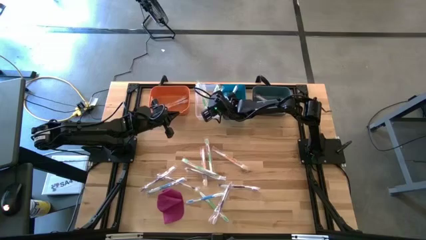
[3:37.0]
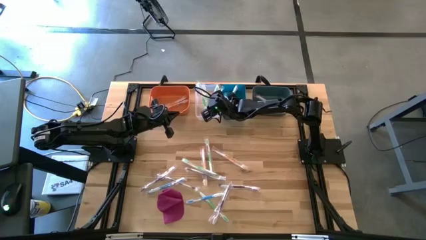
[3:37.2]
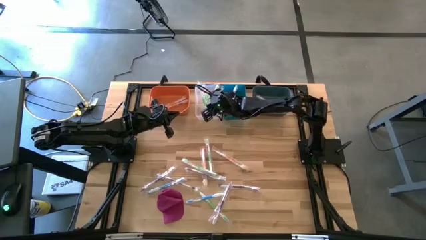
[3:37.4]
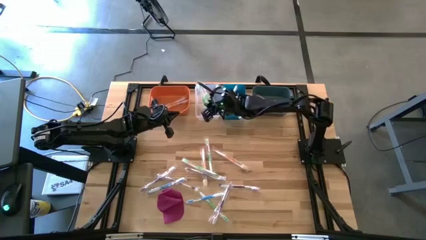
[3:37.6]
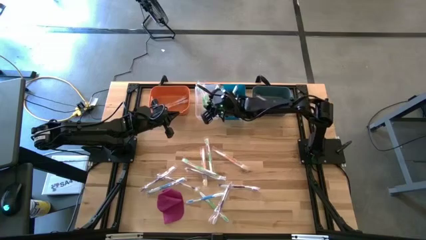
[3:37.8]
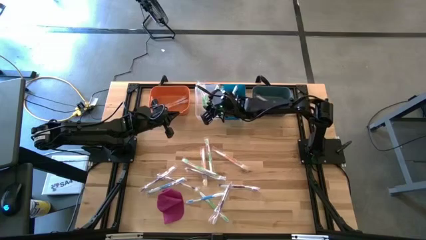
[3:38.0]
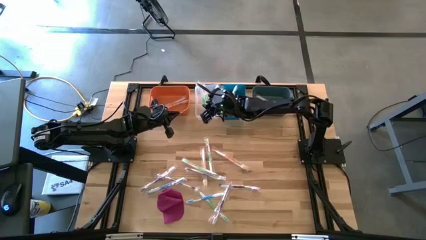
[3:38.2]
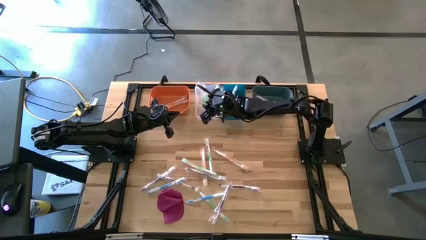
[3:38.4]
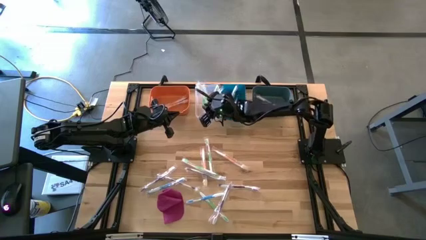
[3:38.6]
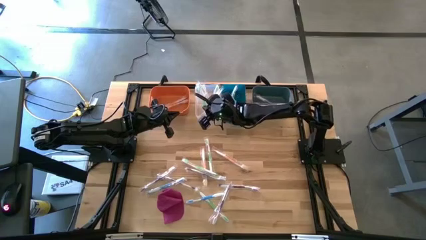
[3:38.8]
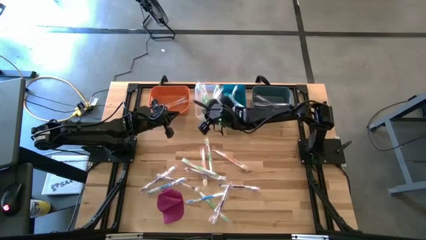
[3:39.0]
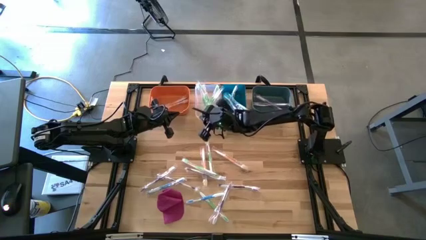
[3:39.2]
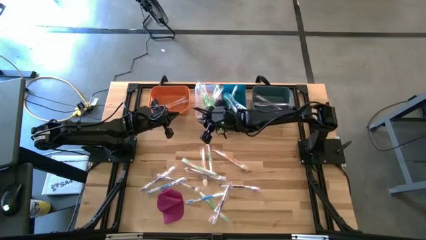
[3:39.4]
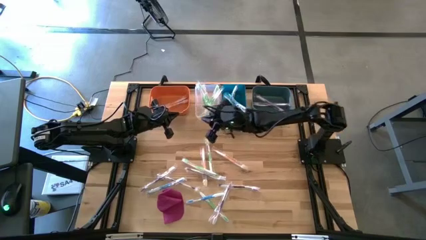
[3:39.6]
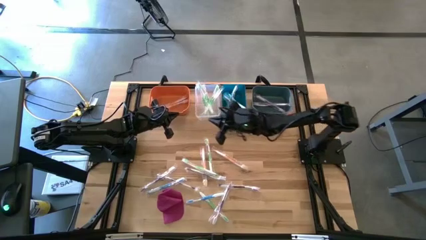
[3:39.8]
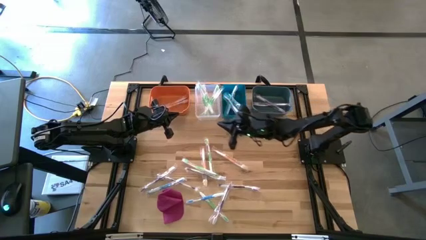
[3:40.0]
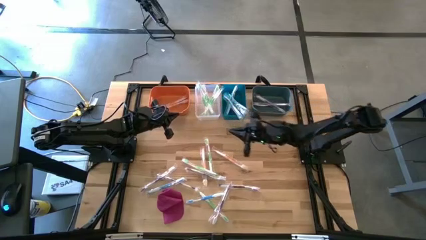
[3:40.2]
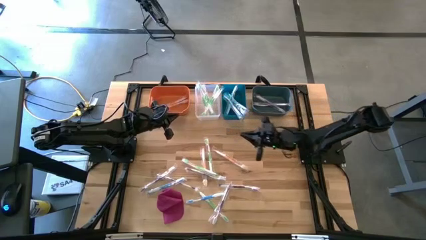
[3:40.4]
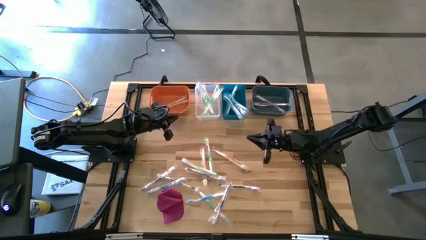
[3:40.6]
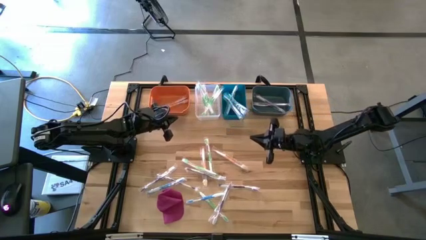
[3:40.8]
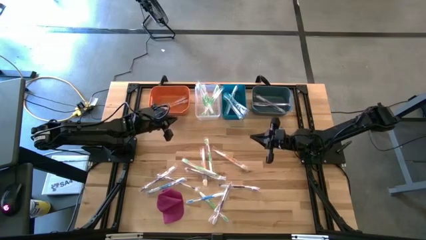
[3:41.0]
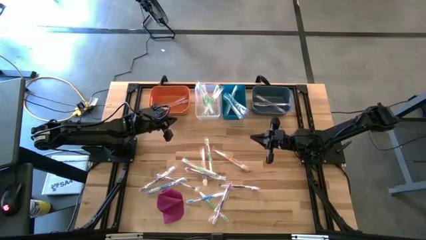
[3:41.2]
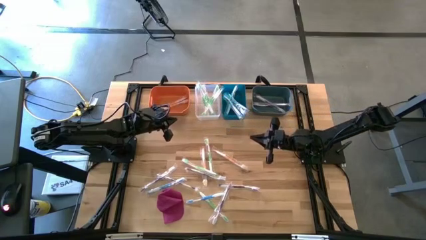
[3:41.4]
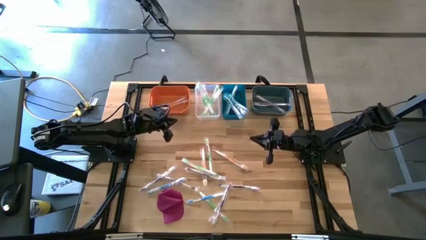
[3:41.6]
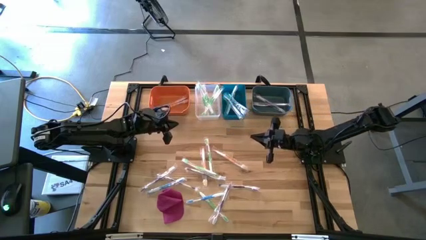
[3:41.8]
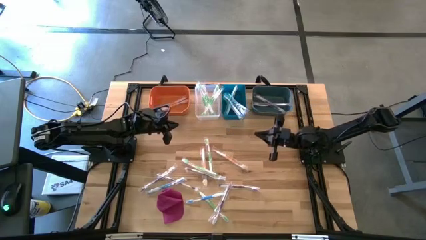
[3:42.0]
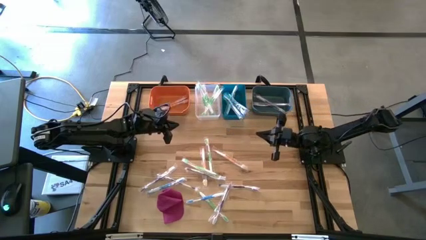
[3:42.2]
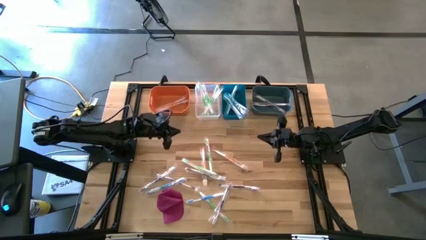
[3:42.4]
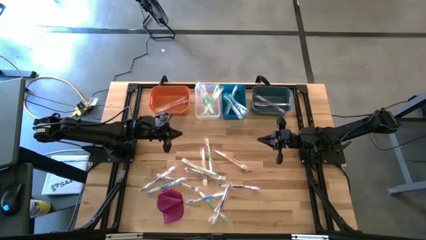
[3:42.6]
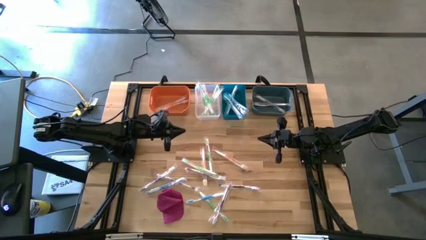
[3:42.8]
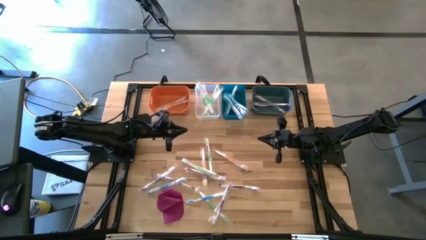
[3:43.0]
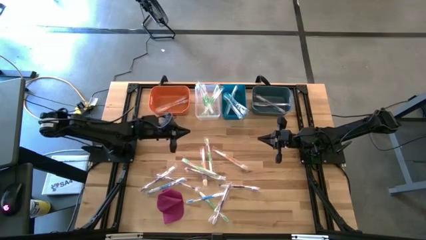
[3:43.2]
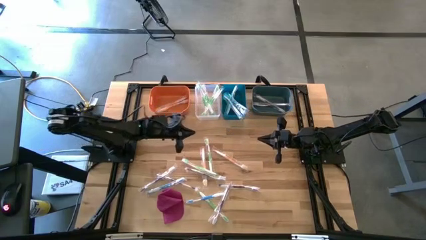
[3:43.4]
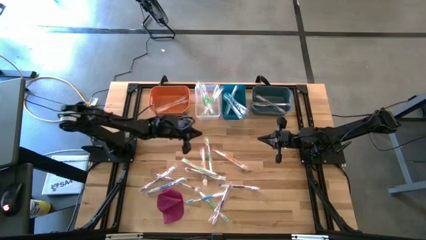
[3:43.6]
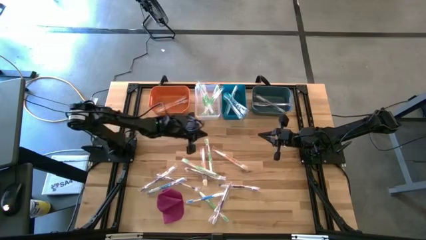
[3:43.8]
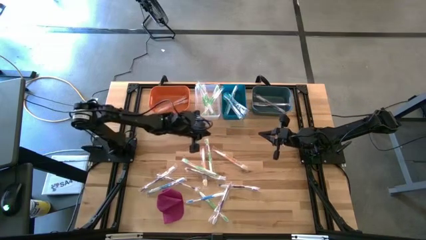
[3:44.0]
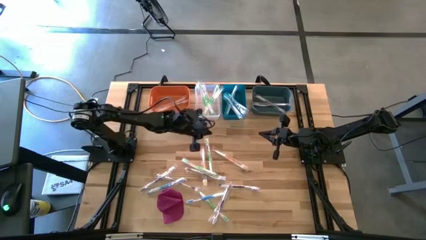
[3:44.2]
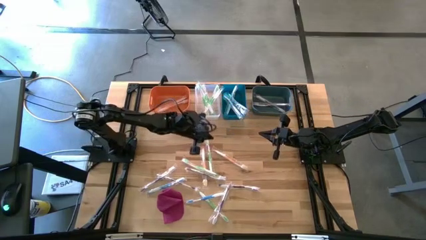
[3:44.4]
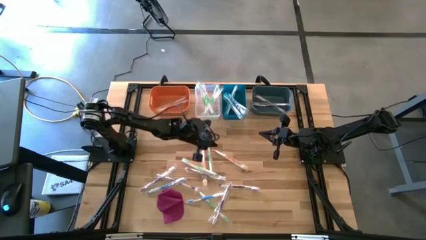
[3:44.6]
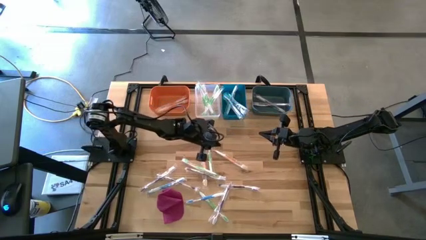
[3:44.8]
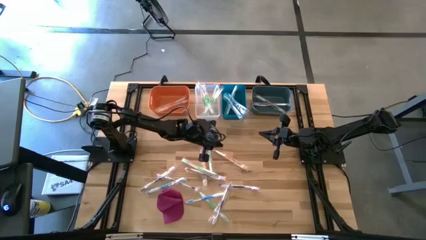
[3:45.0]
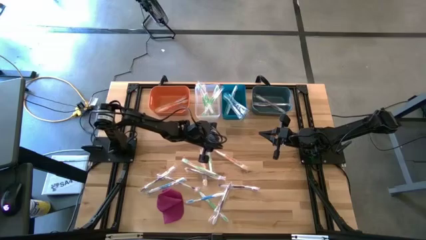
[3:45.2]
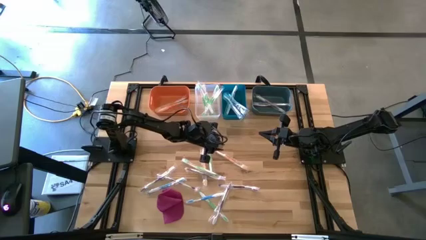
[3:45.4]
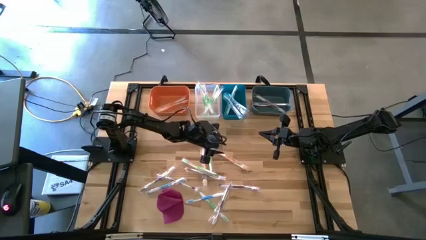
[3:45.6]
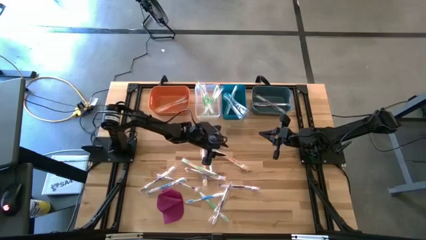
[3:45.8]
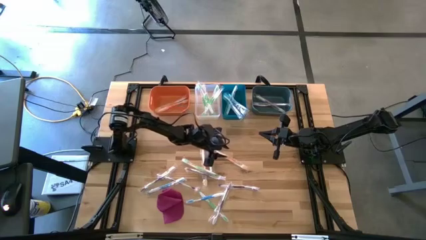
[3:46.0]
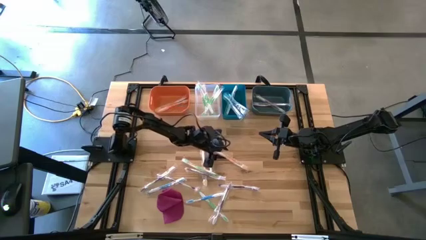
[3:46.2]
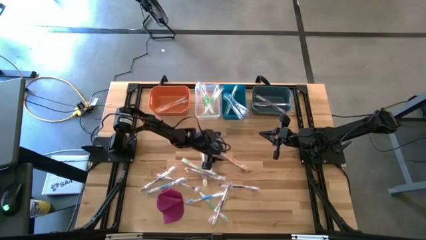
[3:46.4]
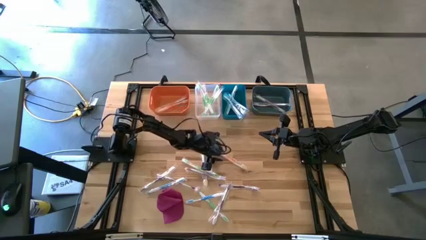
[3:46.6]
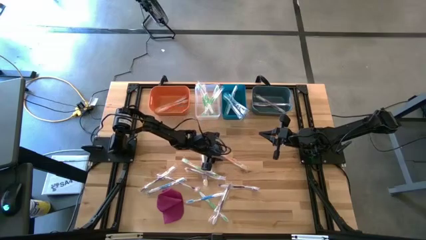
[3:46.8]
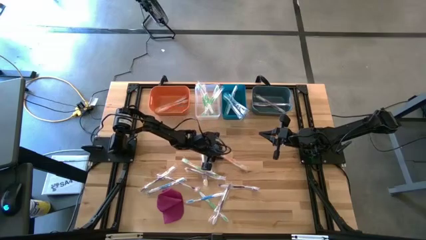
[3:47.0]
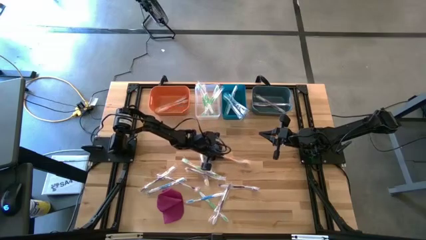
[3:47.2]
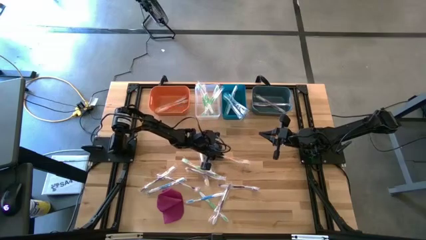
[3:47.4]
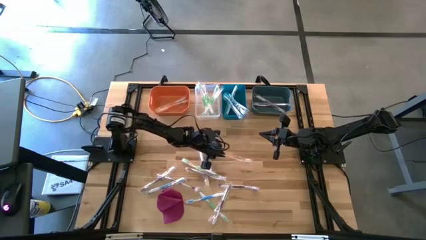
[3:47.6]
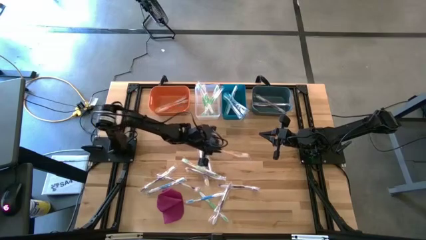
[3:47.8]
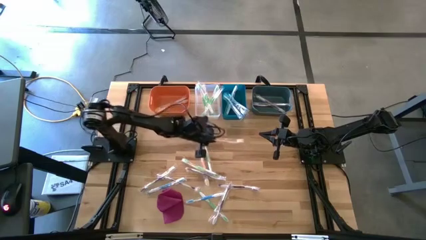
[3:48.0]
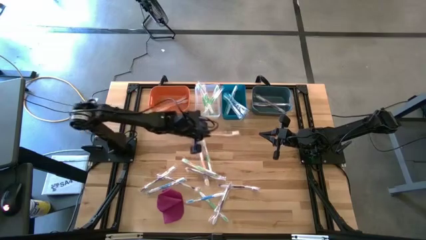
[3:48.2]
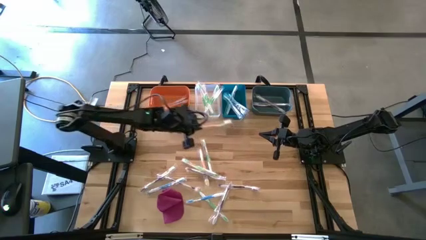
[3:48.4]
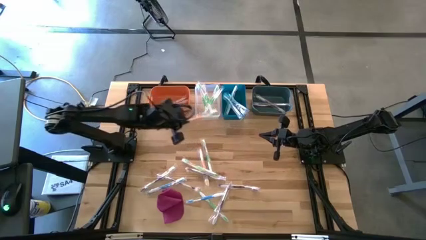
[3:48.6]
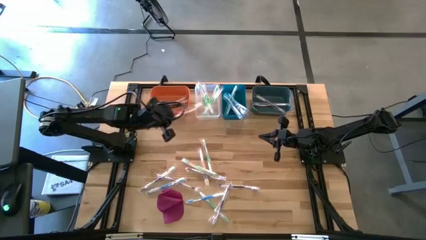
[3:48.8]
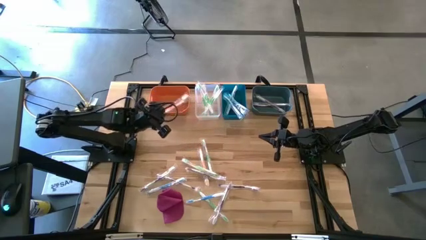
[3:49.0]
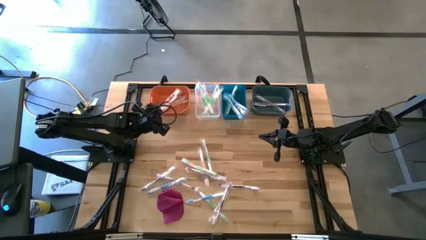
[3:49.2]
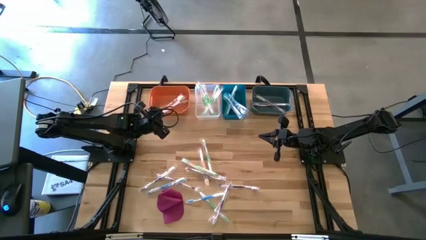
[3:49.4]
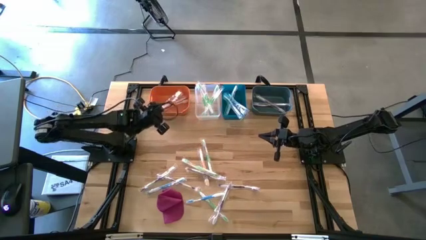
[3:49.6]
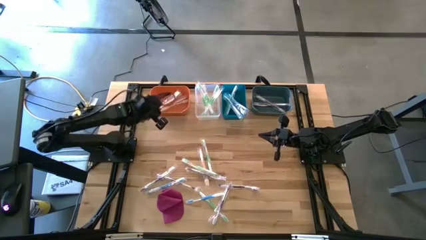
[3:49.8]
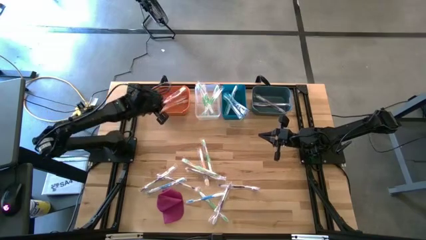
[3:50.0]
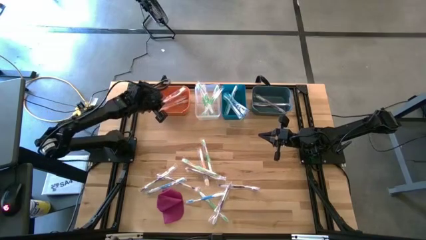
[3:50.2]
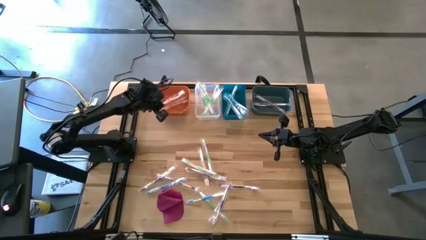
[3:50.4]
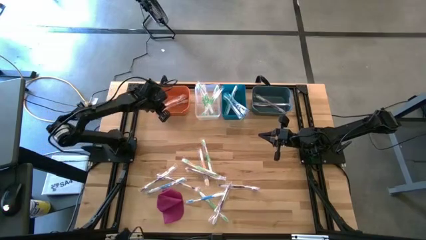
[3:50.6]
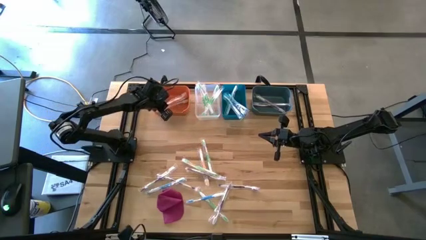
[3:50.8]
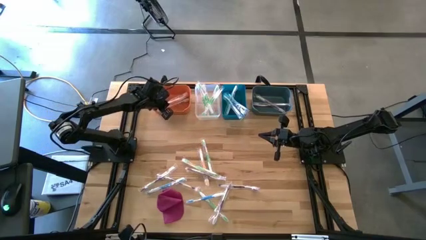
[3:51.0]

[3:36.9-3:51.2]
Task: Pick & Place Toothbrushes
Put the orange toothbrush into the orange bin
